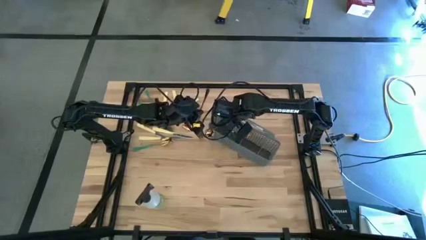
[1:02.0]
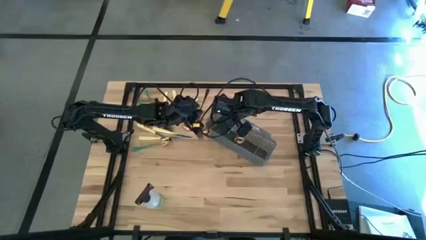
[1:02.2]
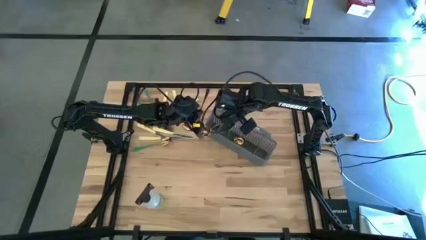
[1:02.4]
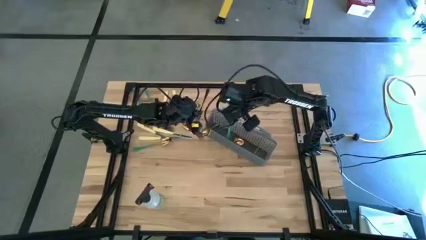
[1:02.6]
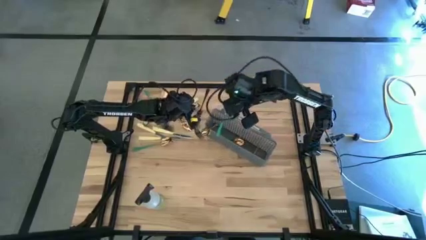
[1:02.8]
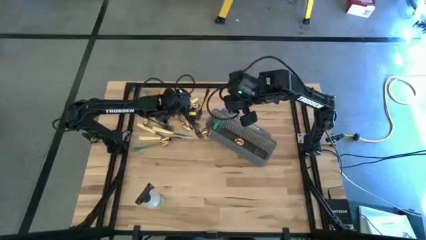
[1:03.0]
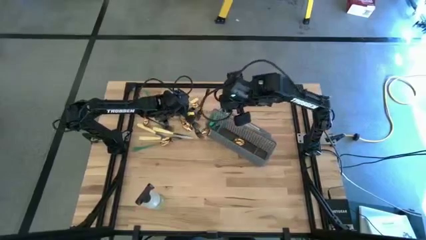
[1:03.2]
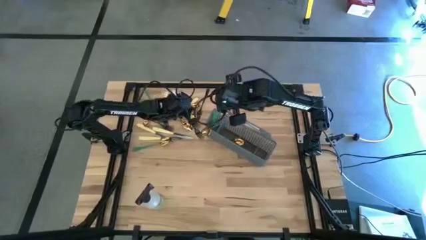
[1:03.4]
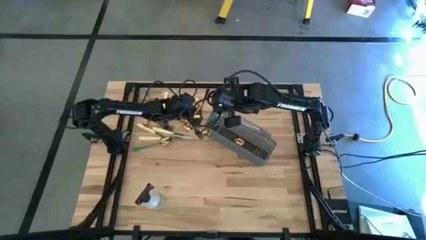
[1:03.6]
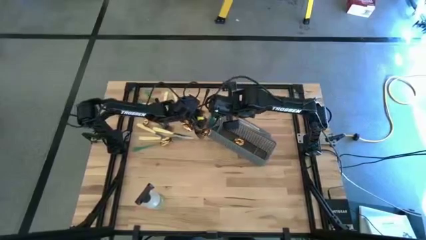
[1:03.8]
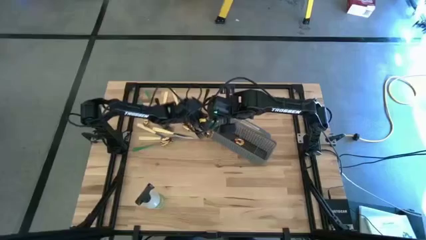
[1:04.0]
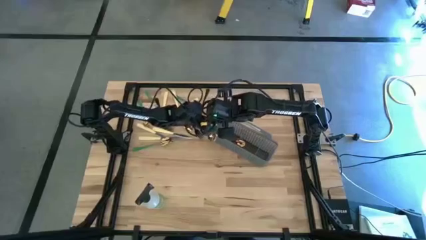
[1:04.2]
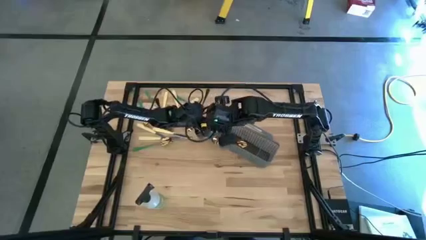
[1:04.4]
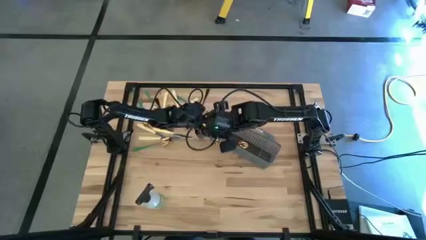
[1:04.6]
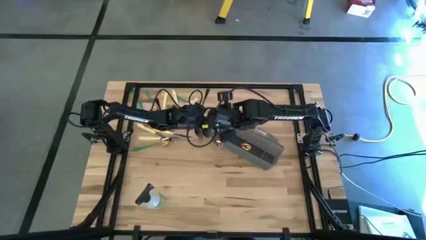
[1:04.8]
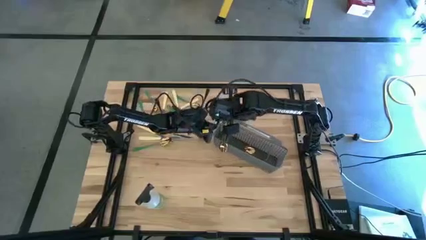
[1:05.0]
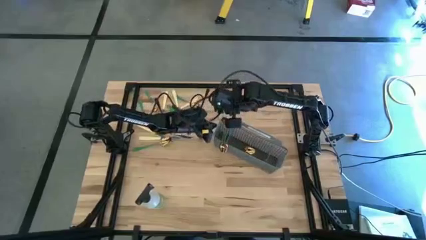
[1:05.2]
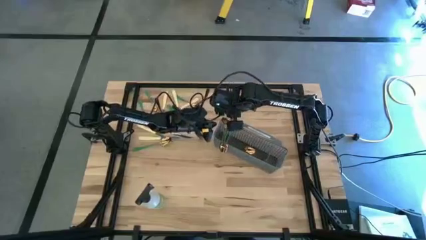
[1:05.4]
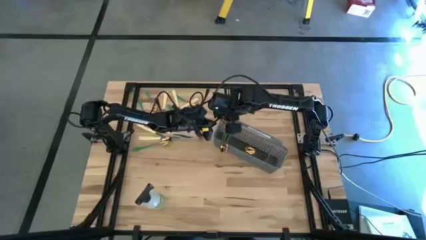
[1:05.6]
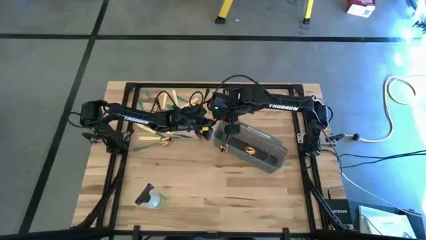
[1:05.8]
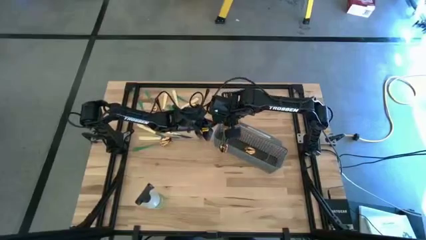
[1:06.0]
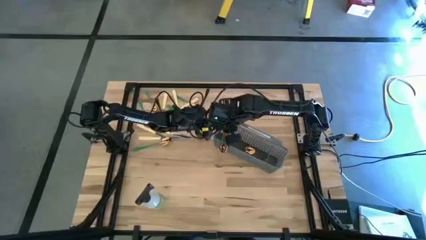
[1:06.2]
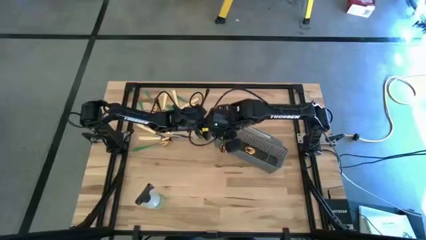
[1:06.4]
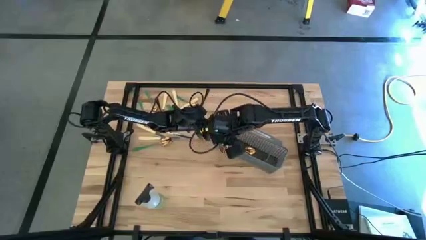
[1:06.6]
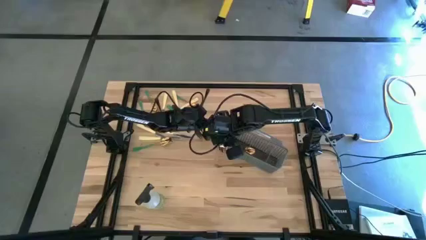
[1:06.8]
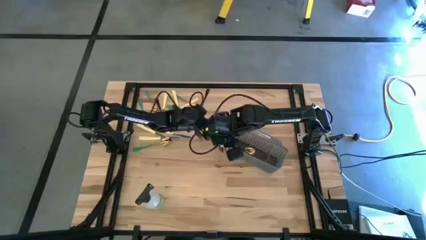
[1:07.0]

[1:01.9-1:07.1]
Task: Sort silverware
Put the gold spoon into the cutlery rack

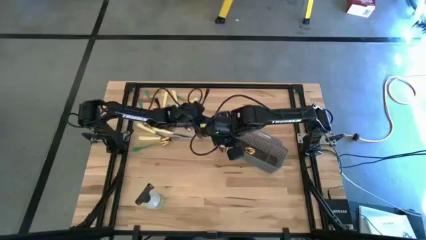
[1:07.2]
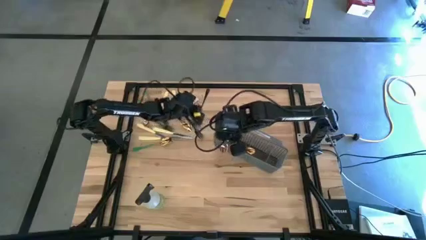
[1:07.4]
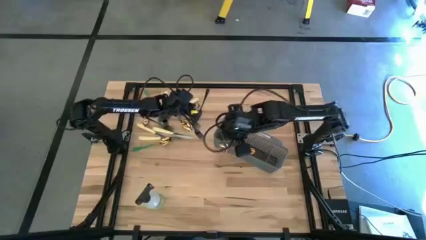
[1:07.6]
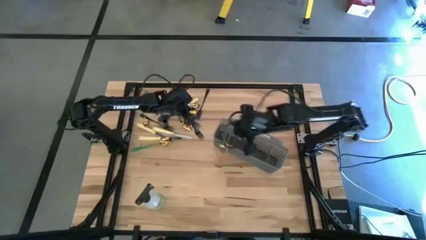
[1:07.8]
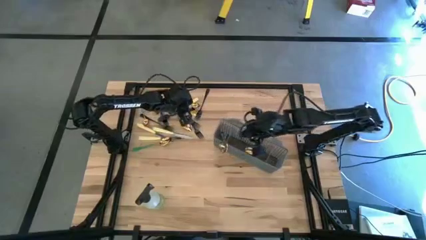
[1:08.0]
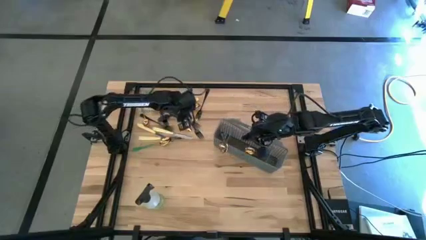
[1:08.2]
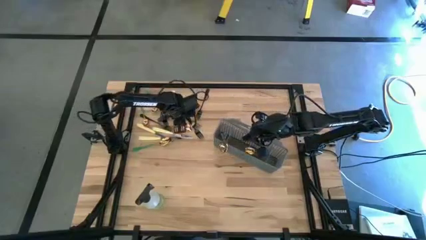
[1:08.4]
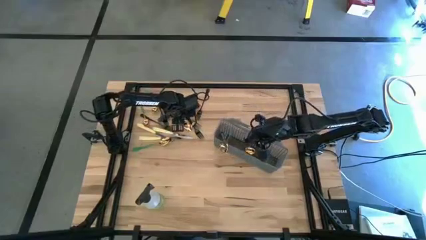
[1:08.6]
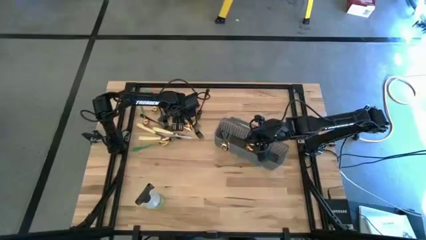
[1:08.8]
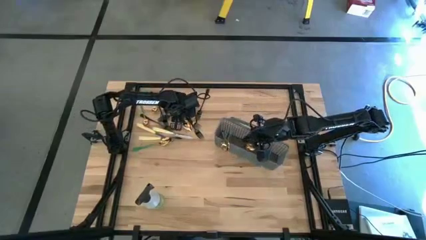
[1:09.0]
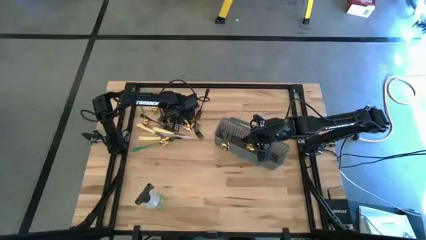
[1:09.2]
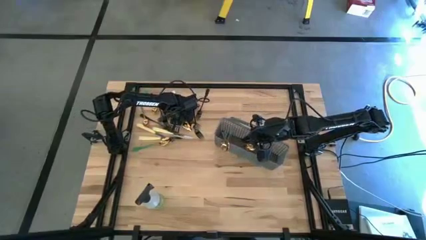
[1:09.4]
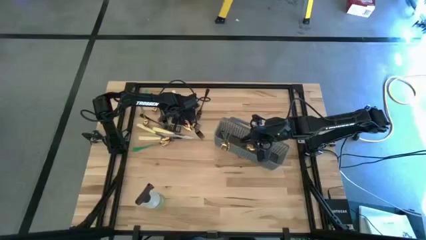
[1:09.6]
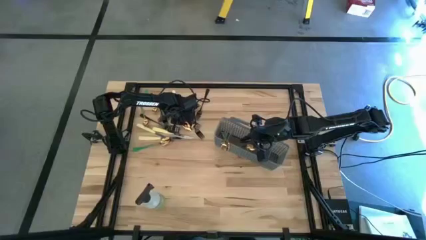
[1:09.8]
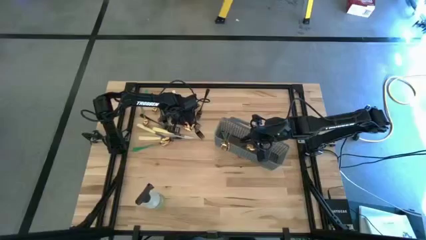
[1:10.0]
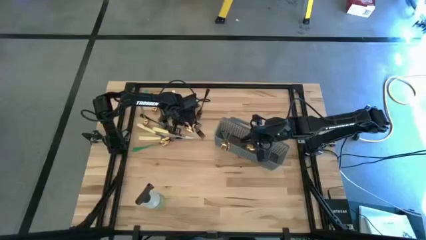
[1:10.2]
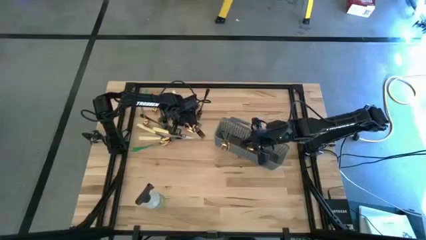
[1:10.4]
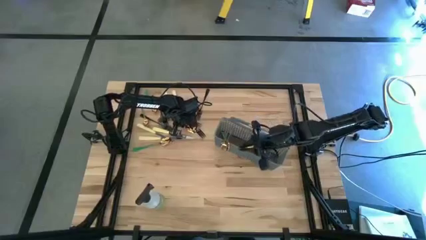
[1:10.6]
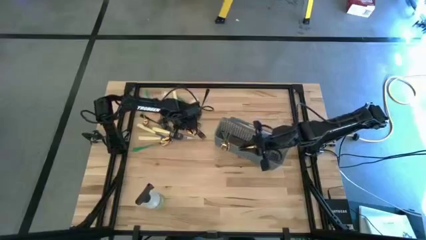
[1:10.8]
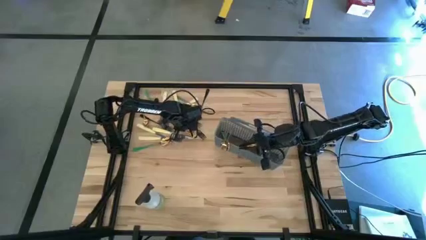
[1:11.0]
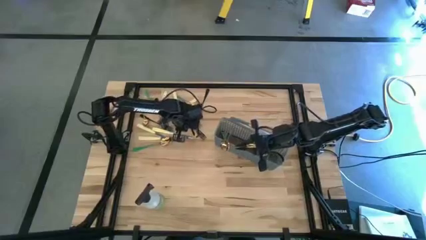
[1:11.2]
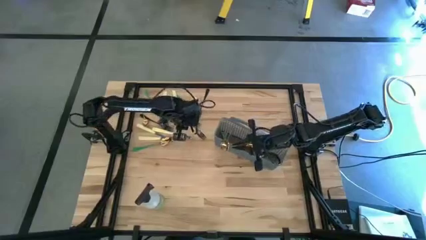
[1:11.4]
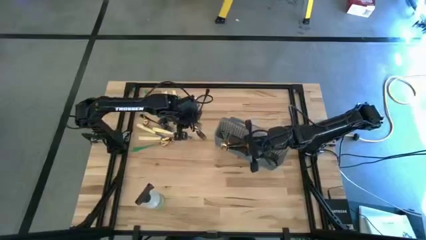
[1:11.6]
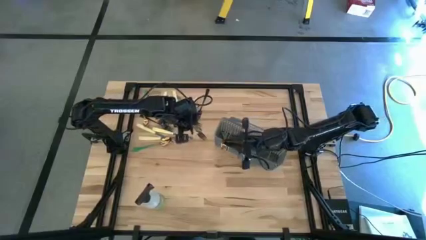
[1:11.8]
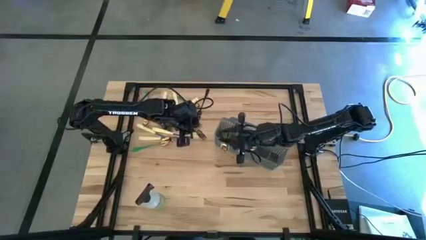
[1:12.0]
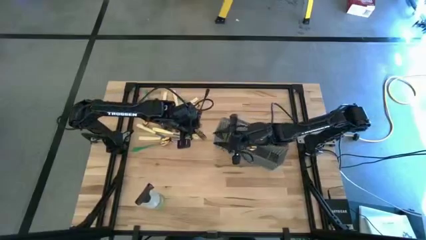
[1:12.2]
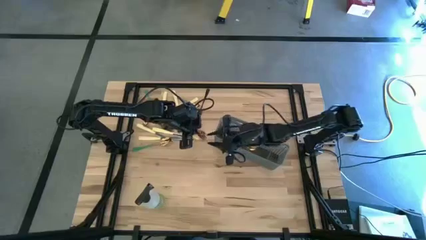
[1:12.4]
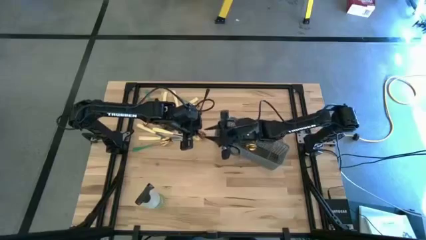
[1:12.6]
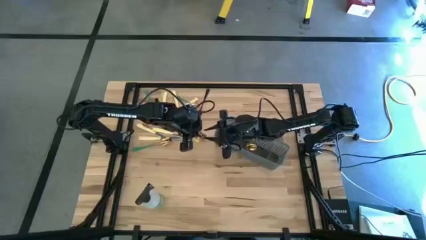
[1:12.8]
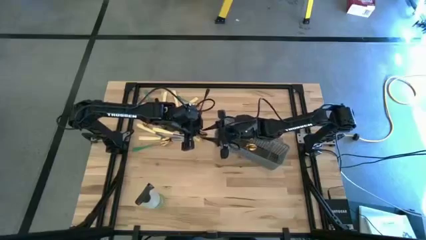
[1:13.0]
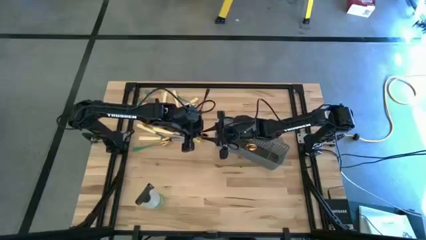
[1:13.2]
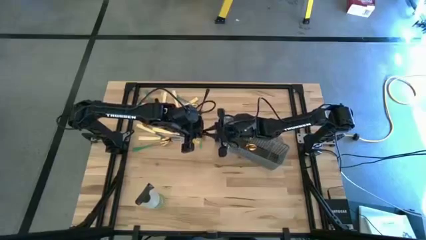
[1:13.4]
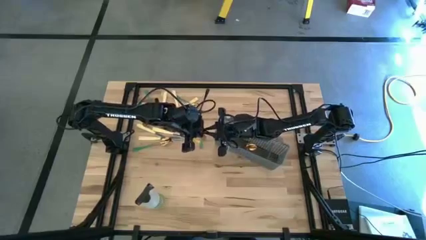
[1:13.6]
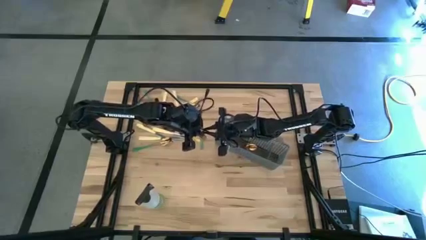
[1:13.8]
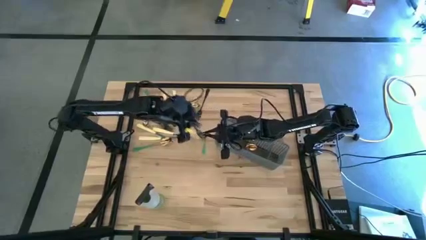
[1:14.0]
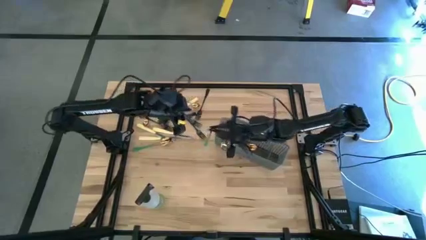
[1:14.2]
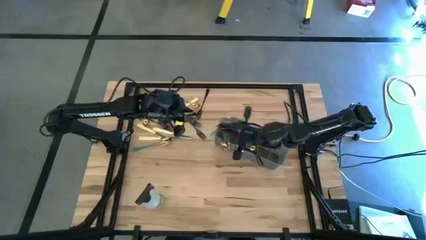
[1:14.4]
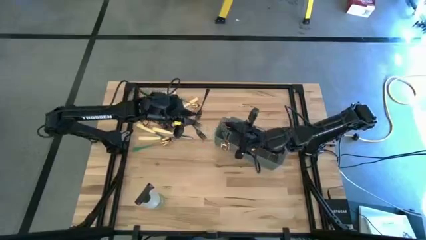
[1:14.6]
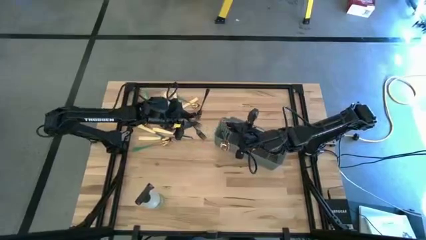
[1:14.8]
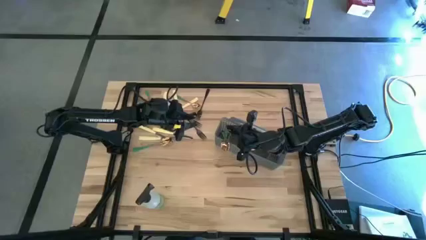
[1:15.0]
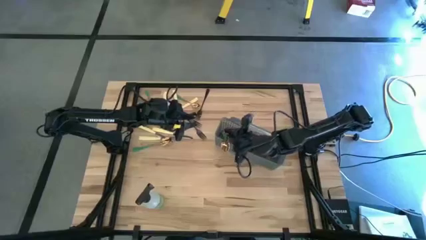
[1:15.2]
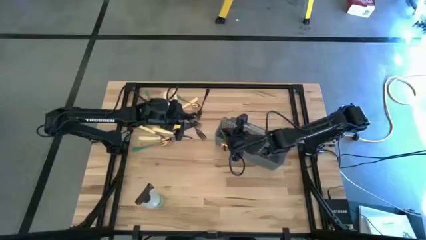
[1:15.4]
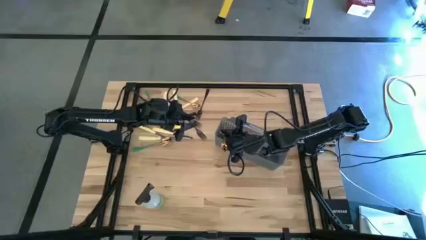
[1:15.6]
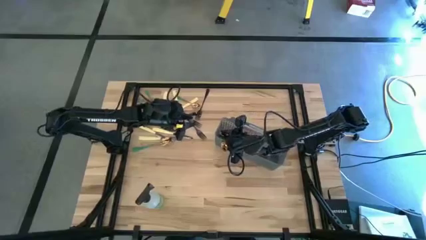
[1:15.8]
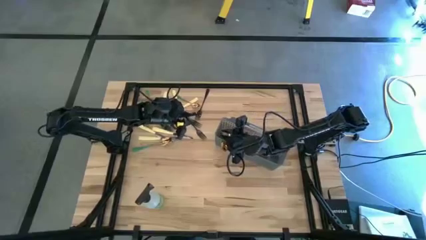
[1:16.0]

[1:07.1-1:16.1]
Put the gold spoon into the cutlery rack

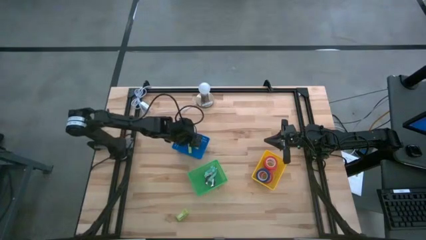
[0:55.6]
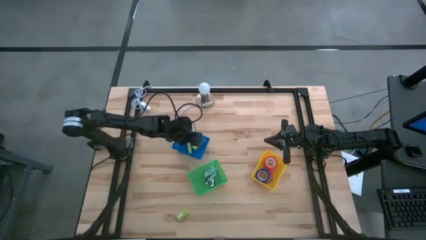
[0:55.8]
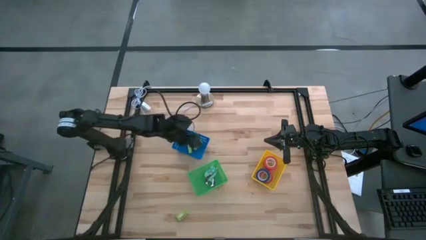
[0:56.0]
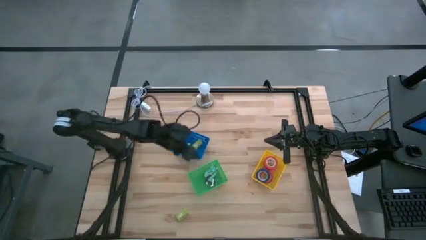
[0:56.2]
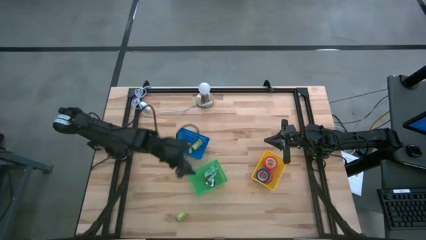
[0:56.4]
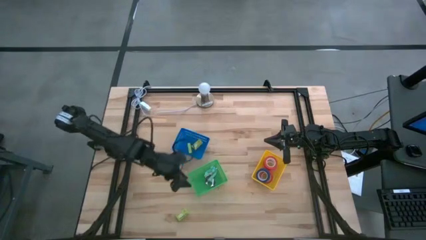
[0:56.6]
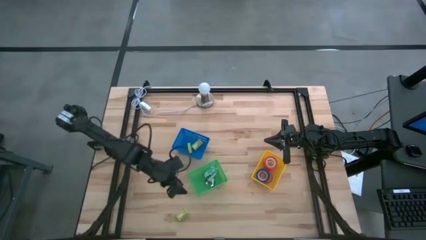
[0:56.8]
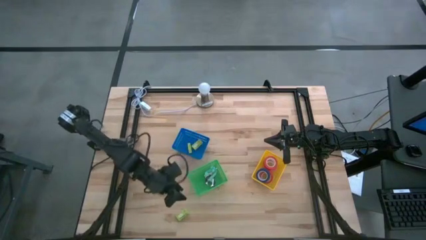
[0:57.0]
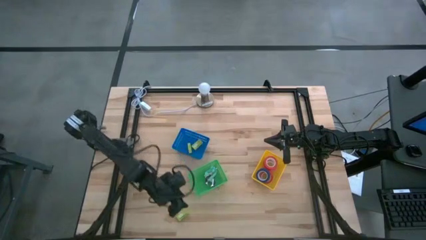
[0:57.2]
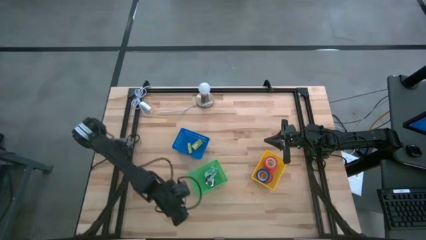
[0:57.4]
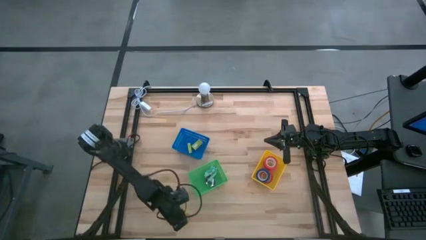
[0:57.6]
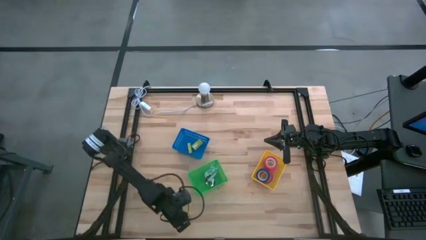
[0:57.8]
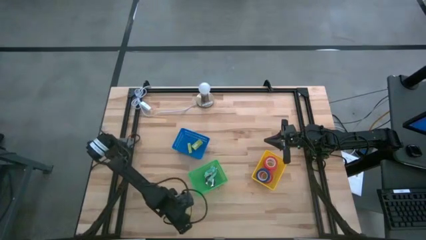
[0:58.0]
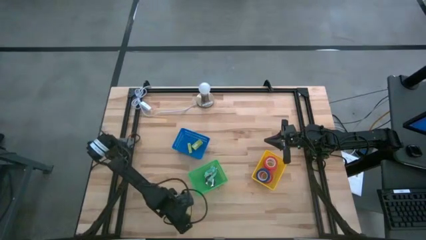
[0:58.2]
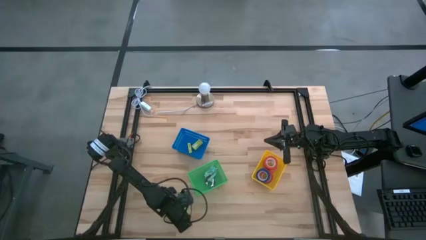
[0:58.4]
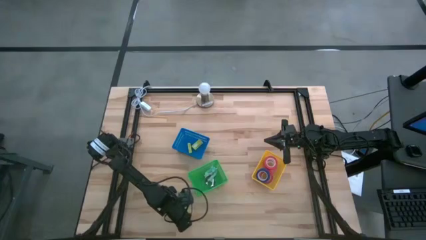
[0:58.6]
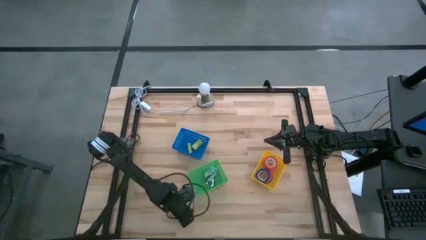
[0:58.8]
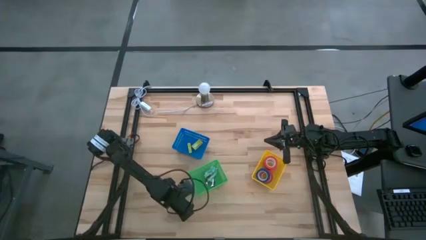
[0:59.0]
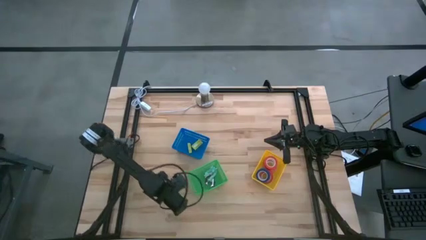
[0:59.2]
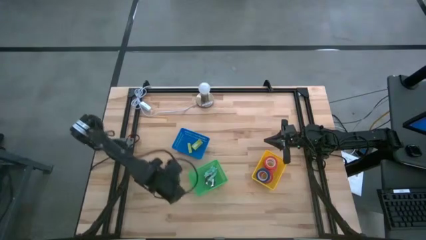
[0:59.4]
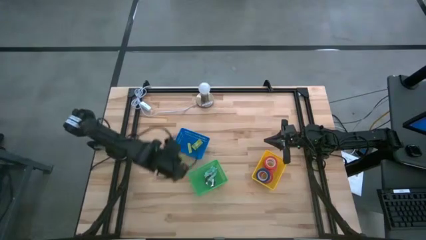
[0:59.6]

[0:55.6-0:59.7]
Task: Pick and place Stapler, Stapler remover, tape
Put the green staple box into the blue bin
